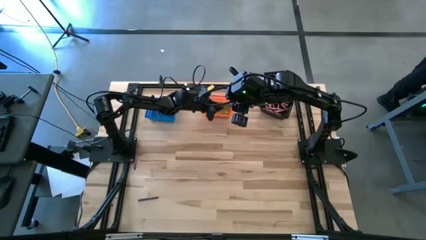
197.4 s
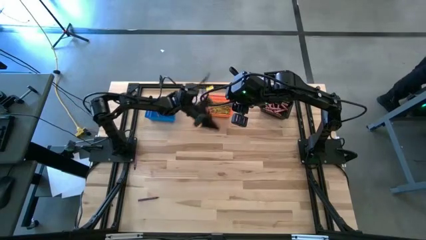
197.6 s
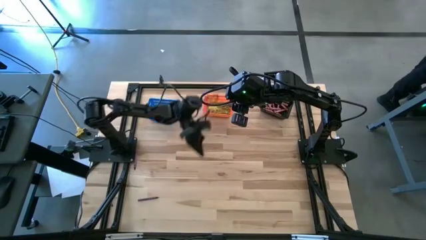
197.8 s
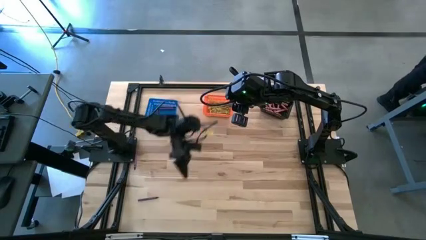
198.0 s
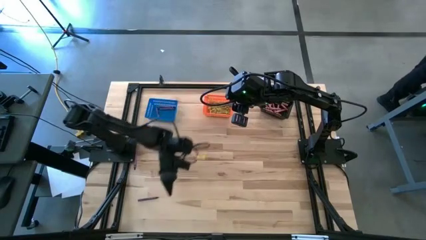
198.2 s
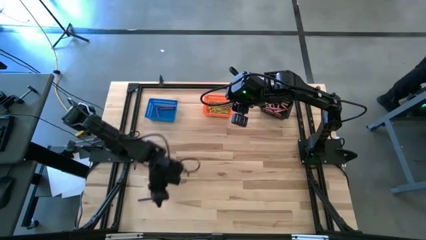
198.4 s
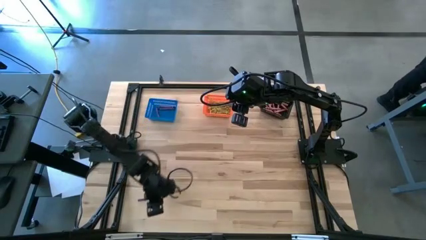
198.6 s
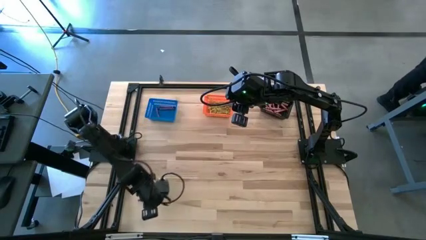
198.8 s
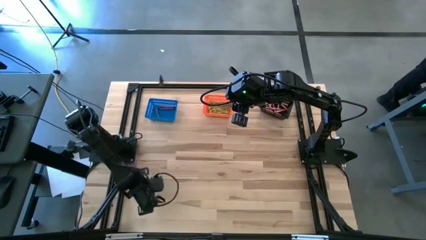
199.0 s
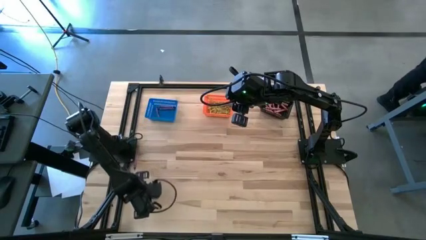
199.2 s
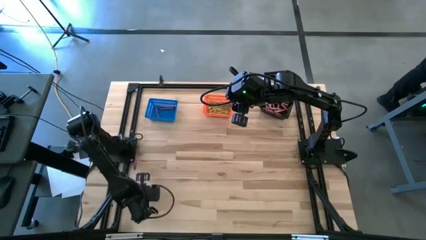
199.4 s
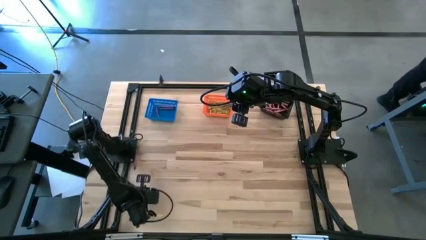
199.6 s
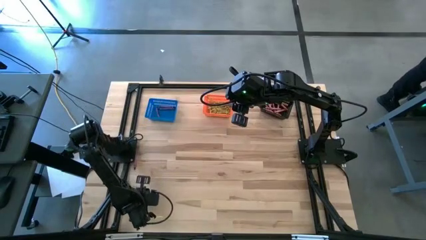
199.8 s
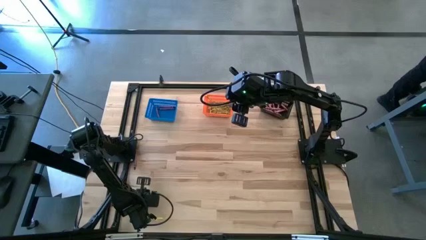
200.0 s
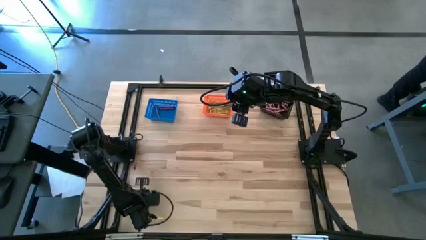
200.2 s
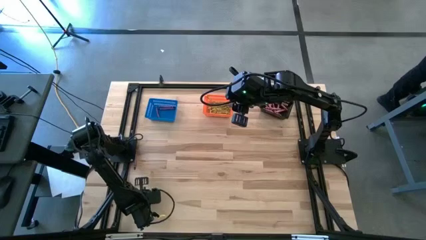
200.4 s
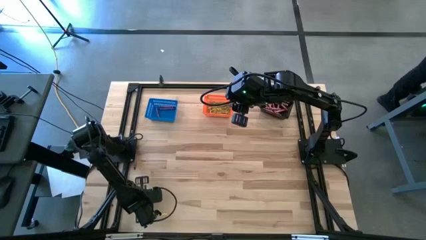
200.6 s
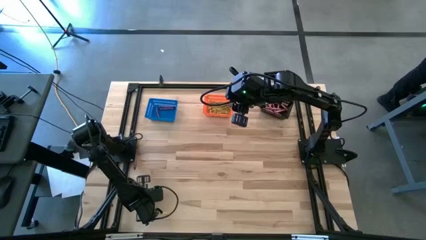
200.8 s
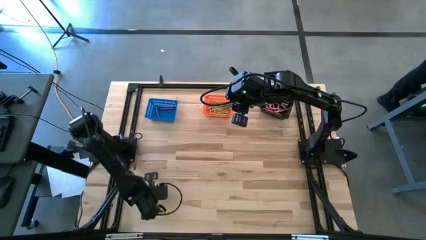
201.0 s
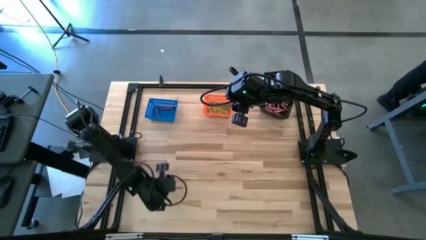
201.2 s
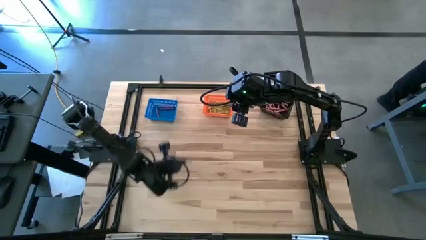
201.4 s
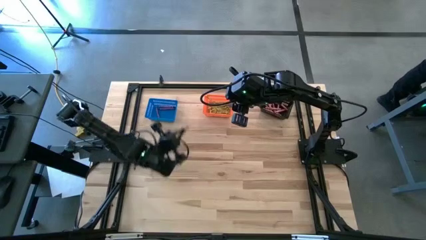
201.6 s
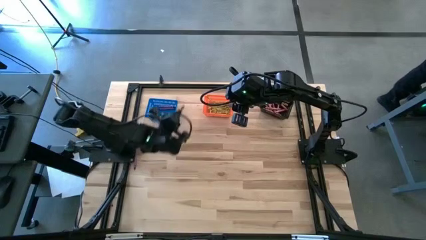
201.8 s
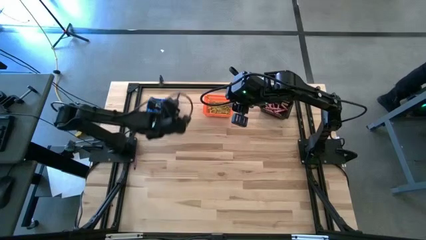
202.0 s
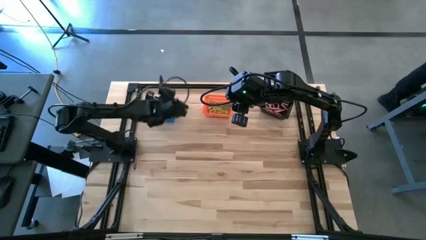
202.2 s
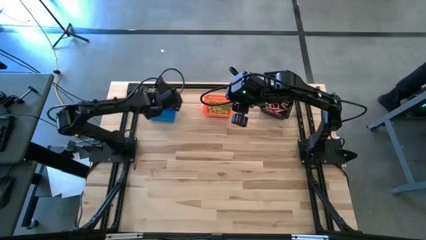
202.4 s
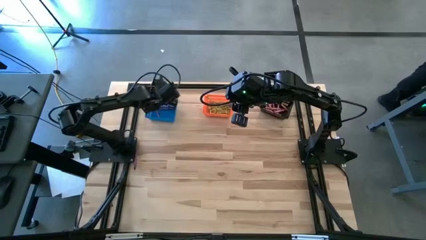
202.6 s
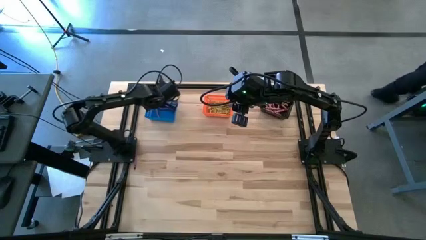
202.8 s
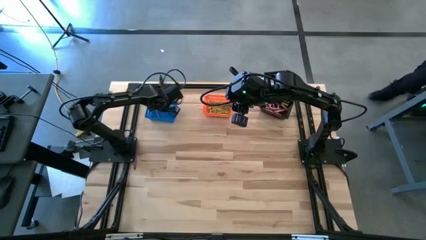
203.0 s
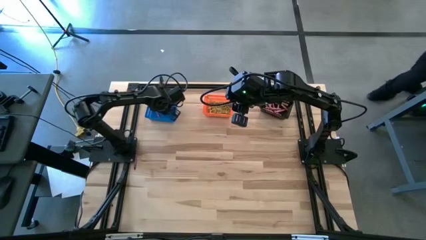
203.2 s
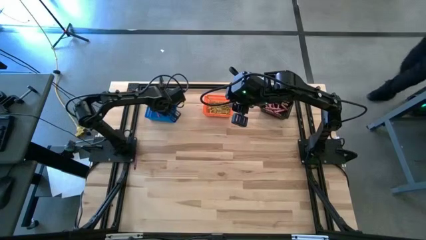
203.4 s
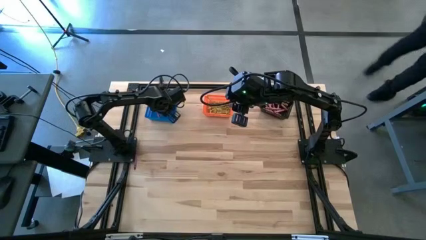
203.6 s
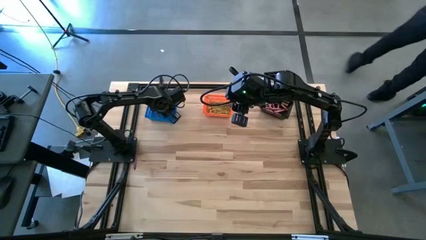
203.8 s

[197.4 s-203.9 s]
Task: Sort crayons
Put the bottom violet crayon into the blue bin

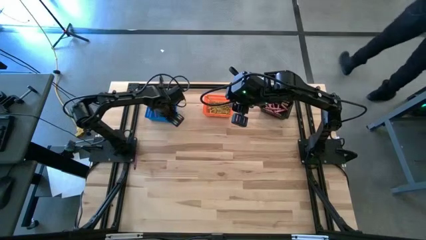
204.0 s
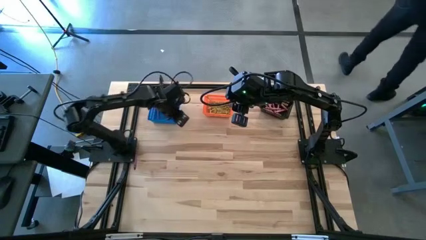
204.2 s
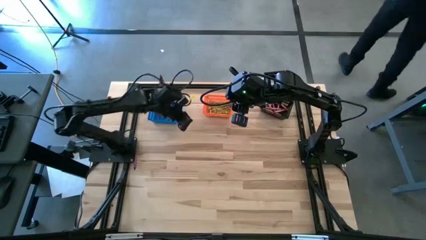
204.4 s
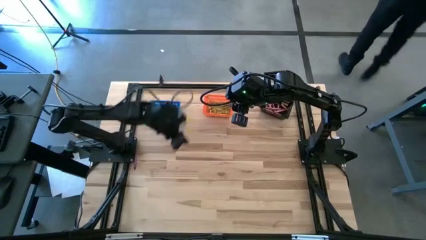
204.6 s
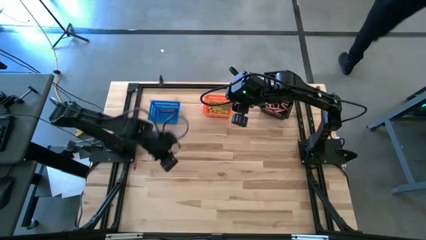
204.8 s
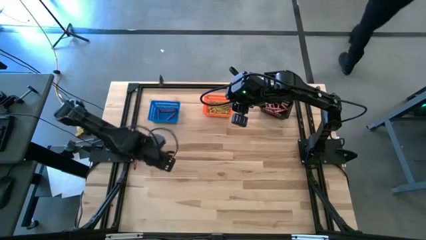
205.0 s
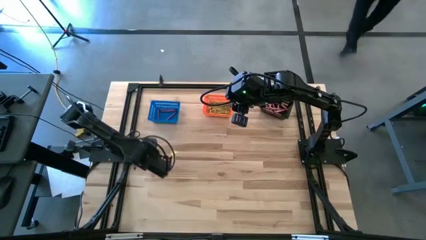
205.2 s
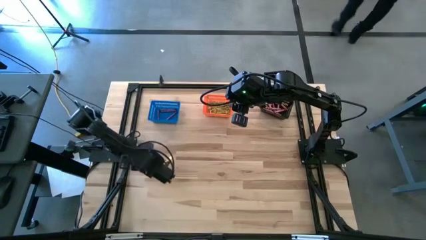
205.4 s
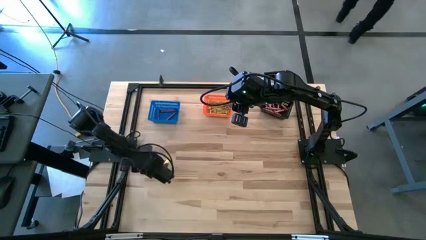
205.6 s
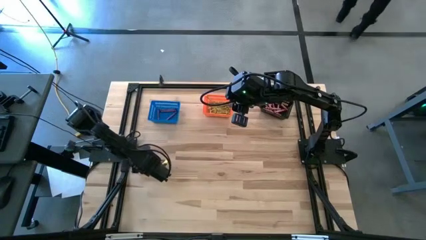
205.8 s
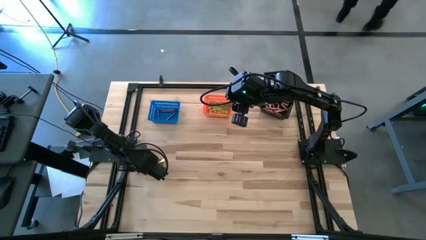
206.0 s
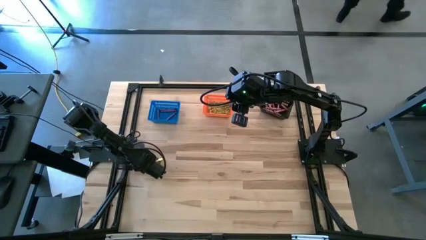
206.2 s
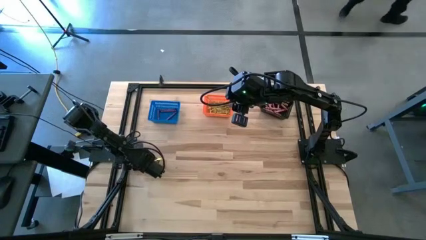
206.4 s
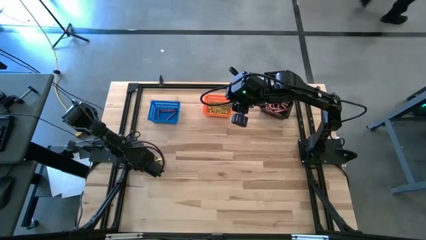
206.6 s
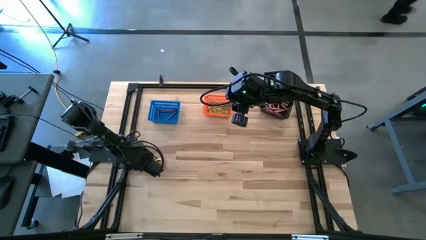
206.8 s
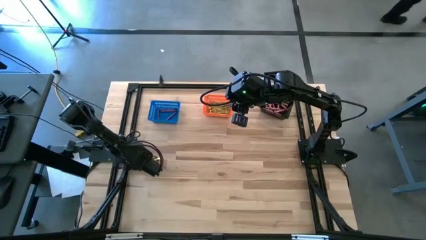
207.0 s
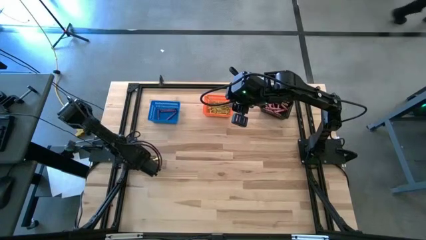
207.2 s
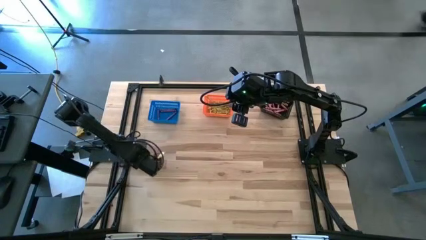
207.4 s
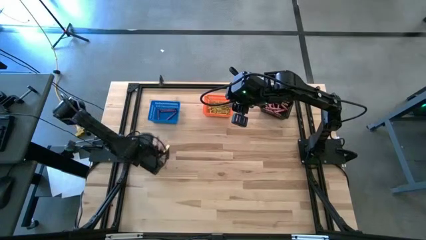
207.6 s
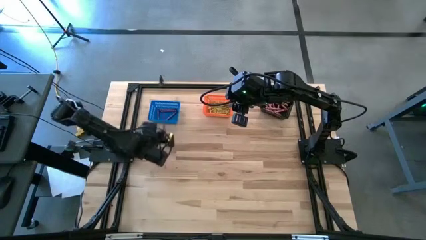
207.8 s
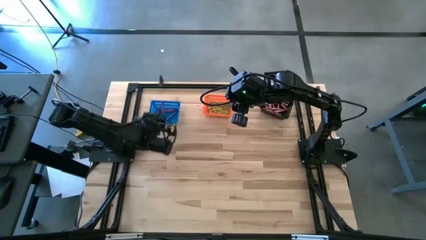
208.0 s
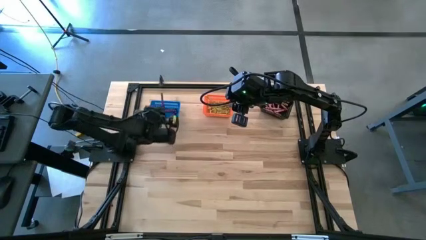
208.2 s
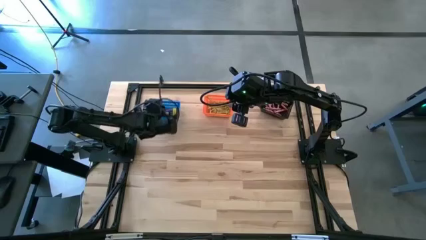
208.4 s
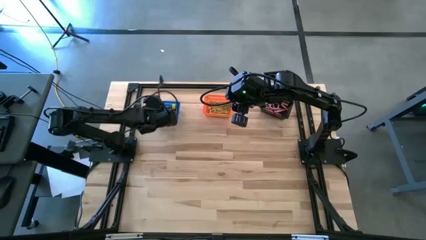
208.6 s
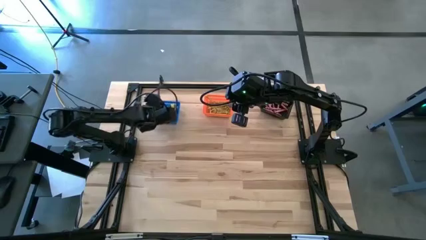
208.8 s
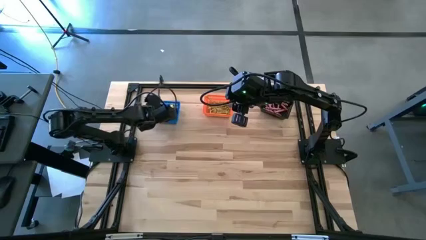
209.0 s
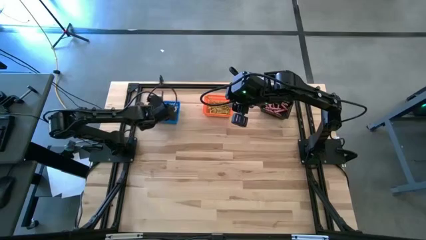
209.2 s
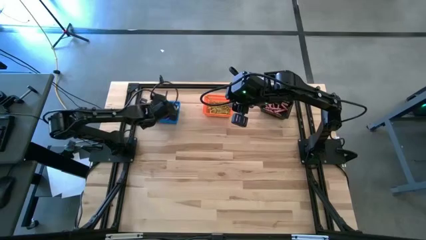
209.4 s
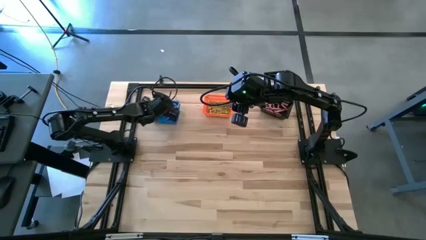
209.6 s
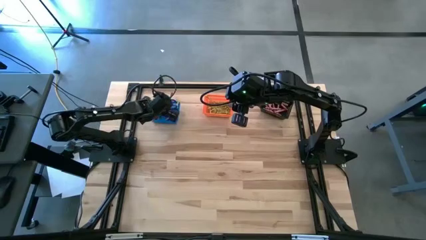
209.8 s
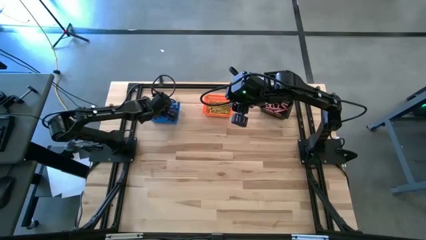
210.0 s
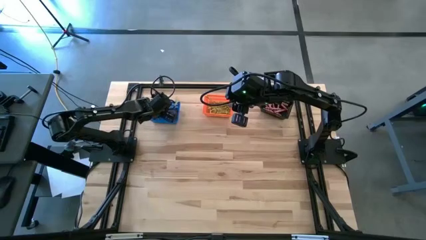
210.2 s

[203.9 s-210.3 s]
Put the violet crayon into the blue bin

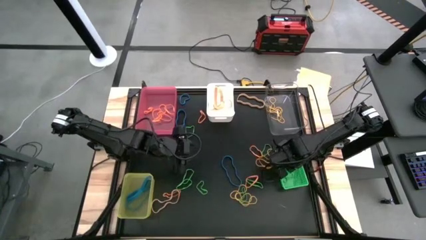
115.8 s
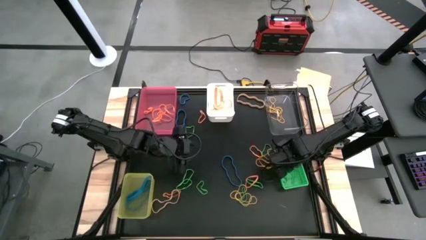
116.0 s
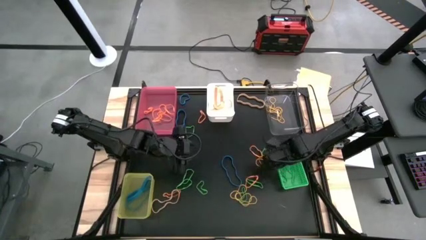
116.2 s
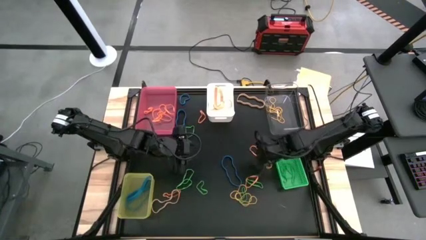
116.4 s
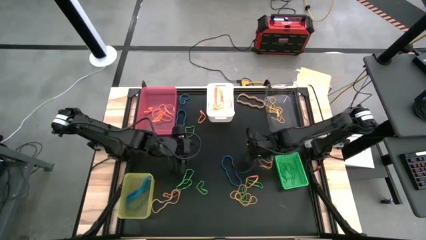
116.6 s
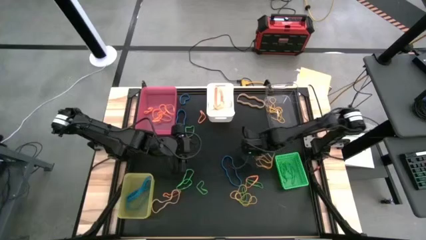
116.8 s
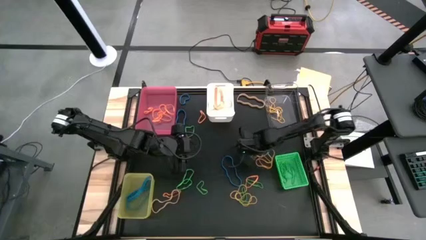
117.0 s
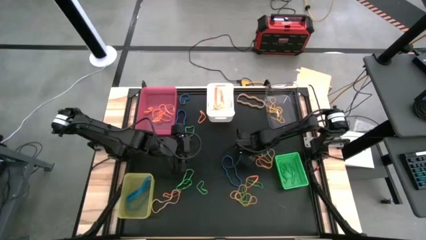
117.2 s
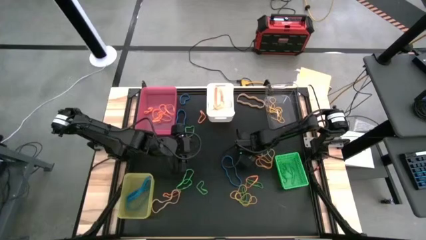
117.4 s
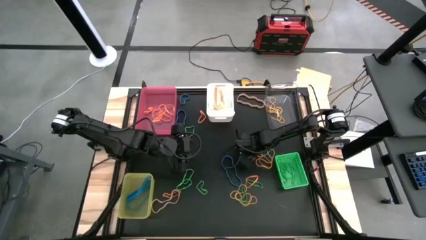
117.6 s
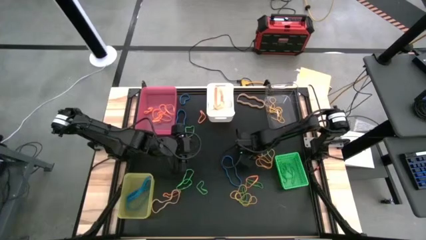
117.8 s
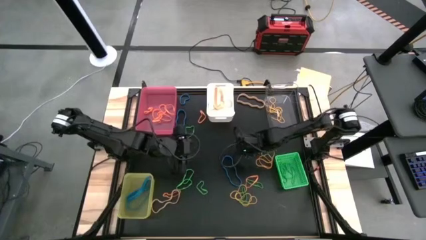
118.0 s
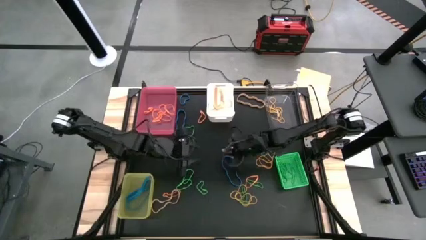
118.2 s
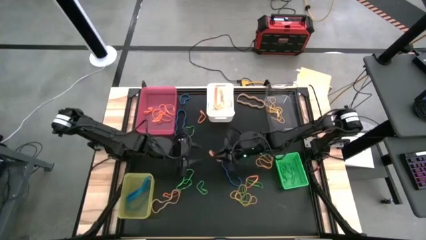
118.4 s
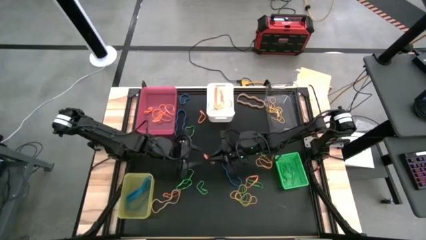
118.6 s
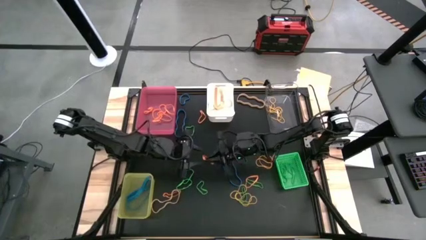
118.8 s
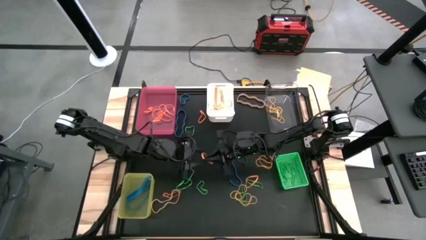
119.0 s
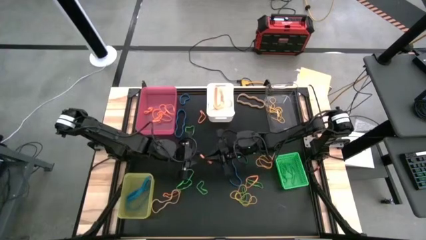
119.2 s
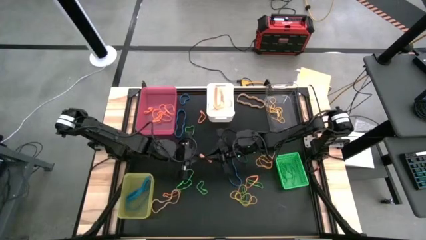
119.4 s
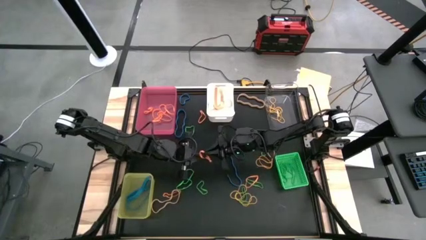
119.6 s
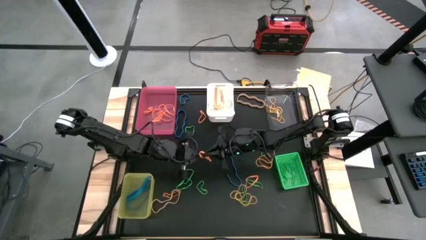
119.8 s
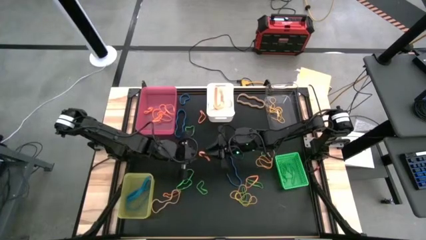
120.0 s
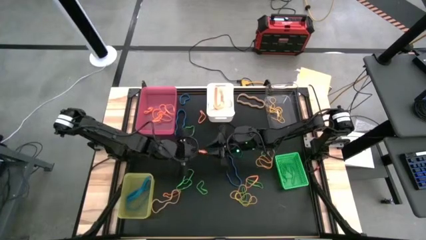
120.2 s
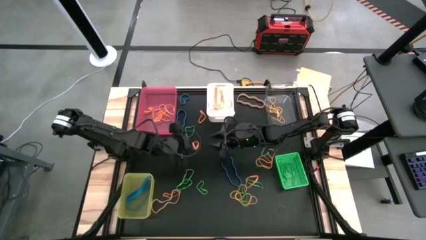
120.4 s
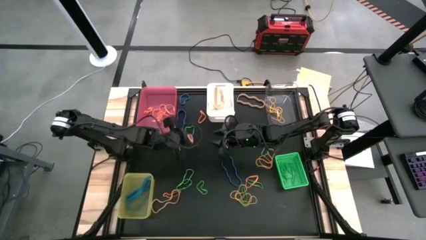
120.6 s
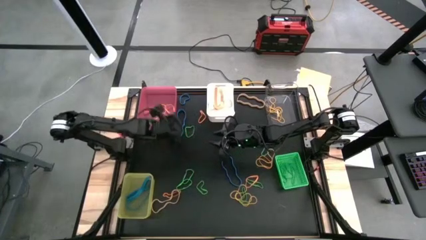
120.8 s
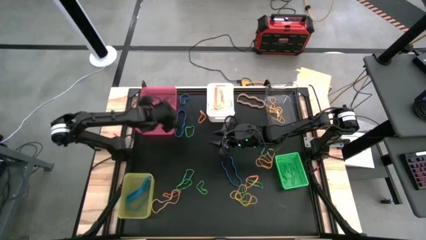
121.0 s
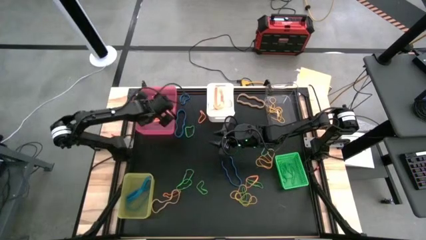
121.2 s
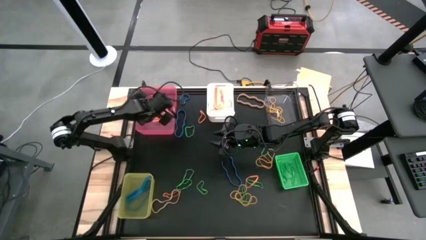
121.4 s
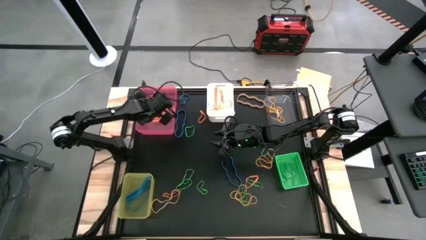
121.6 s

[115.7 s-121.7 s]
Task: Sort rubber bands into baskets
Put the orange rubber band into the pink bin
